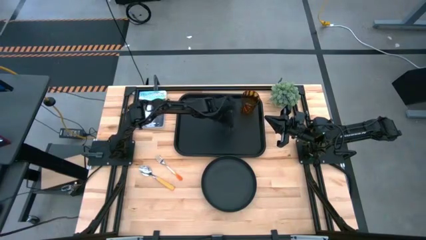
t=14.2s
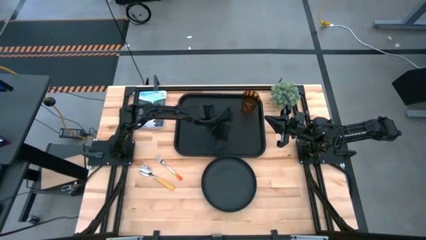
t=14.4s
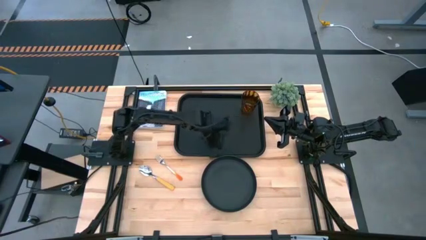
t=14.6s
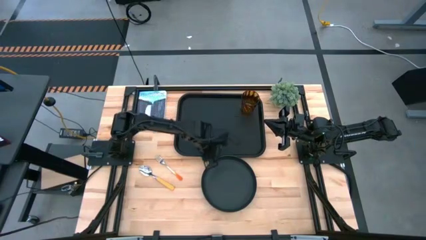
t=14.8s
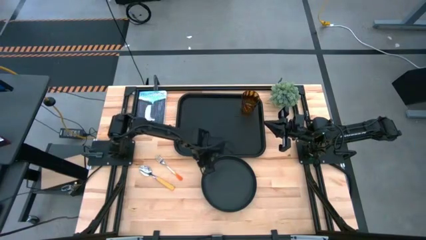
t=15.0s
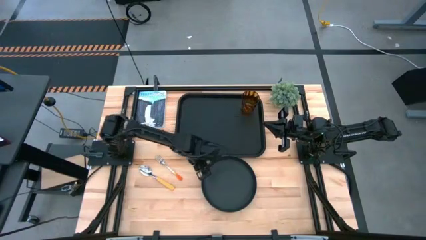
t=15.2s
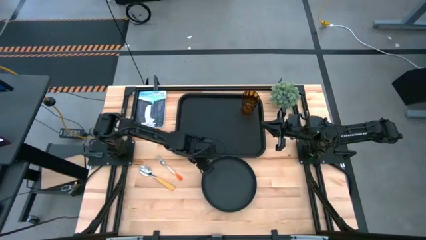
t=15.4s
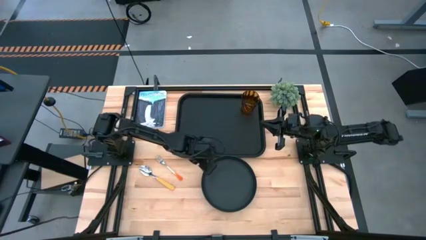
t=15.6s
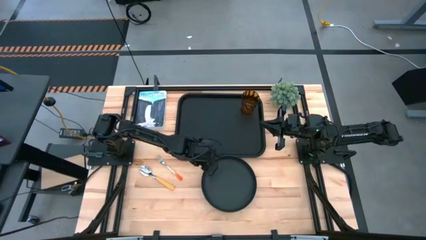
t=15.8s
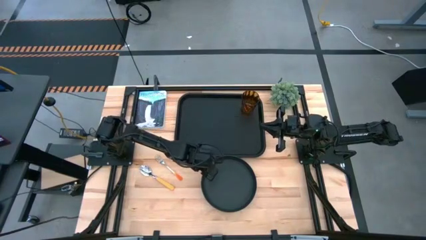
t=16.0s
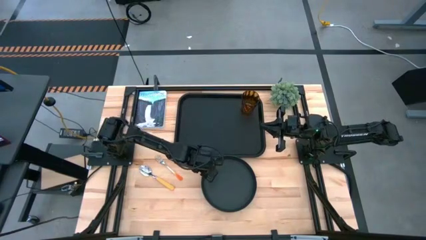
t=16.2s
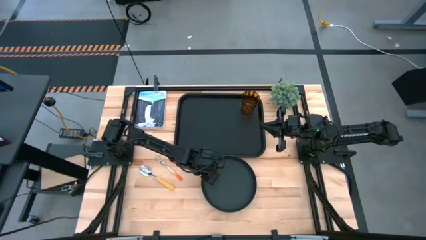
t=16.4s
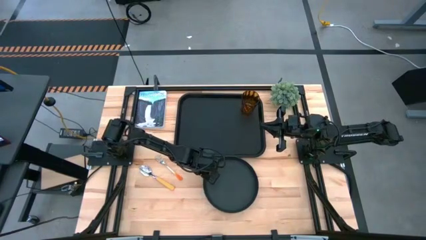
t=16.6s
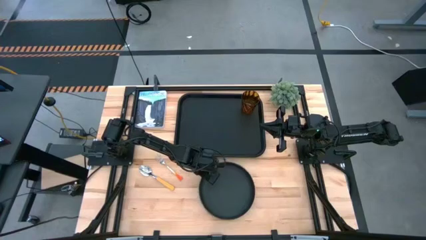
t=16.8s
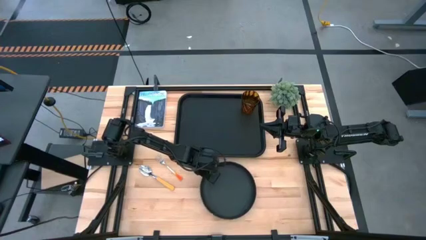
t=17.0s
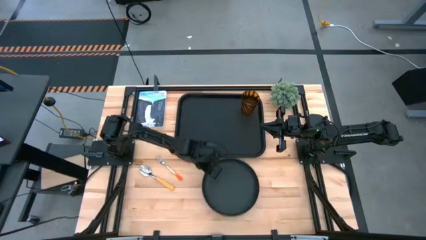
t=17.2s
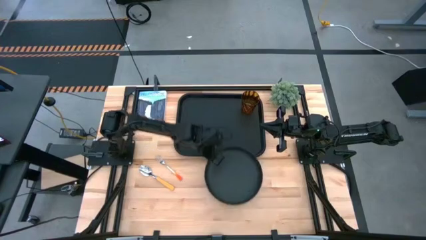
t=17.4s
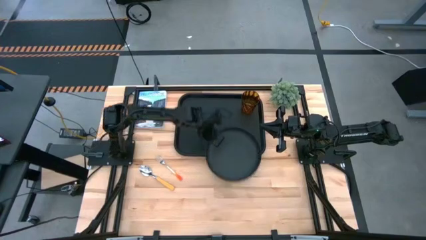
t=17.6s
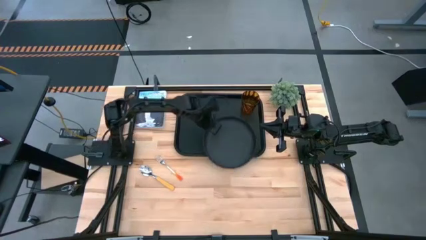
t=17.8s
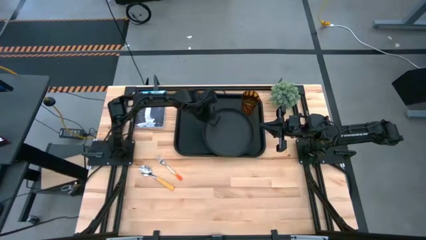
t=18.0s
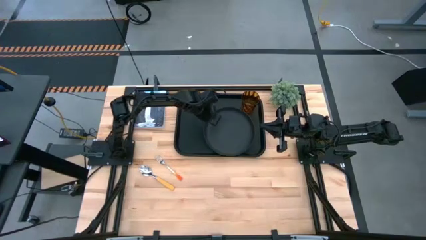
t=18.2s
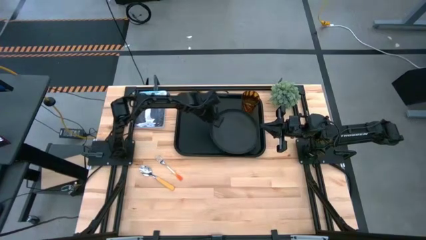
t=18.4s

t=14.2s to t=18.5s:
Task: Pick and place plate/cup/fork/spoon on tray
Put the black plate on the black tray to the bottom of the brown cup

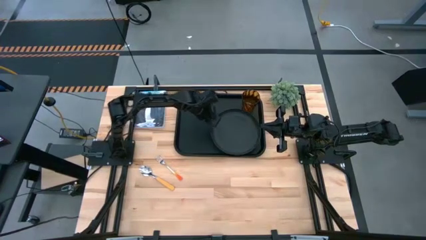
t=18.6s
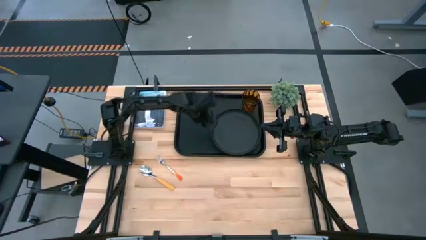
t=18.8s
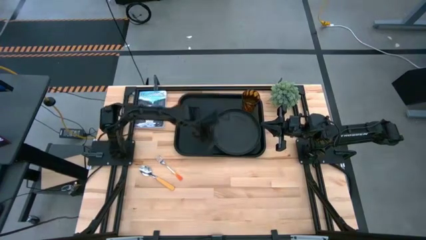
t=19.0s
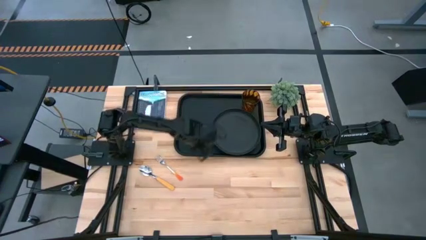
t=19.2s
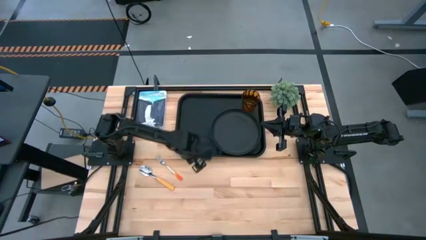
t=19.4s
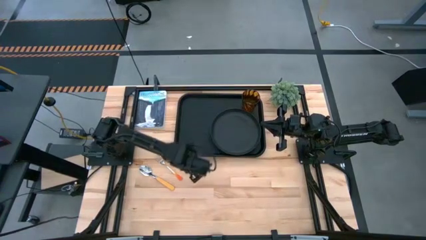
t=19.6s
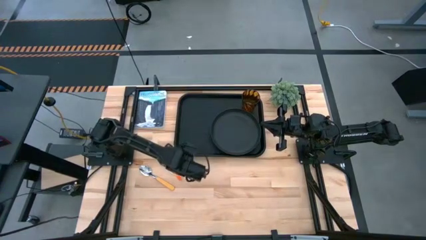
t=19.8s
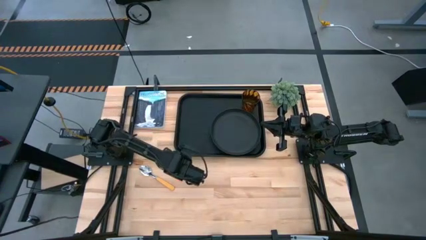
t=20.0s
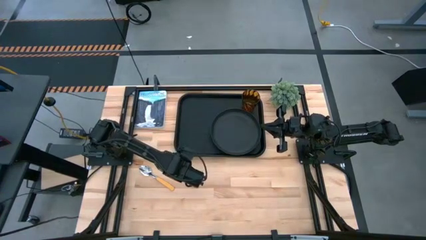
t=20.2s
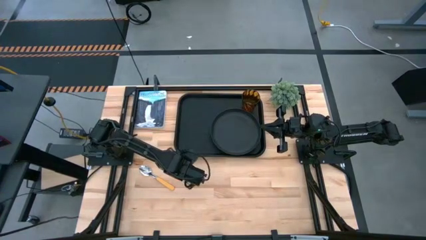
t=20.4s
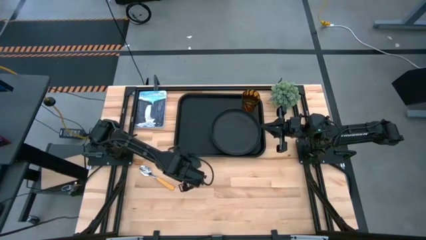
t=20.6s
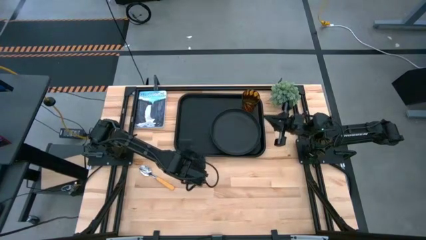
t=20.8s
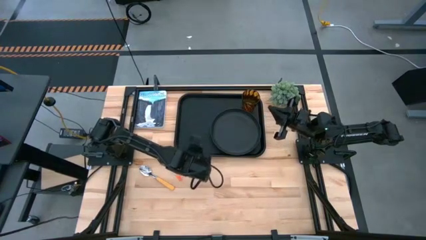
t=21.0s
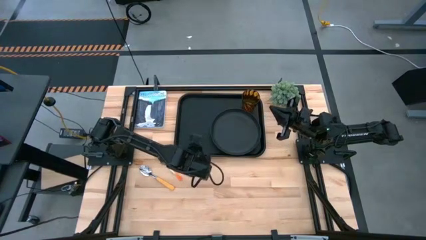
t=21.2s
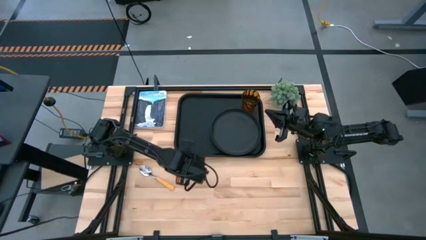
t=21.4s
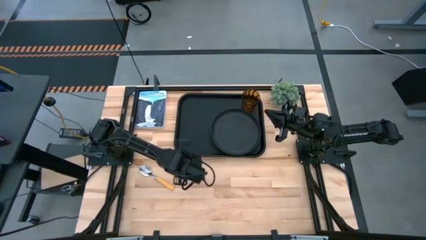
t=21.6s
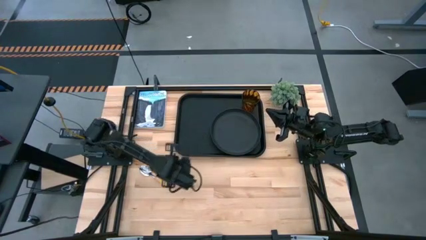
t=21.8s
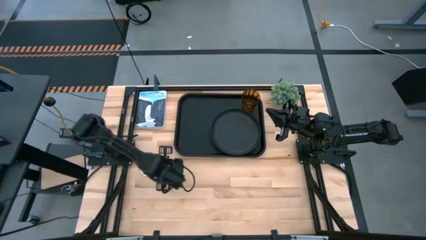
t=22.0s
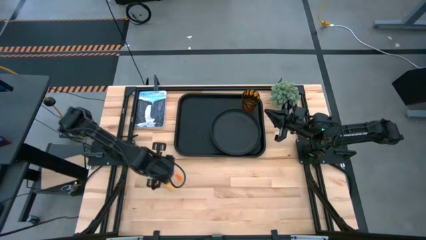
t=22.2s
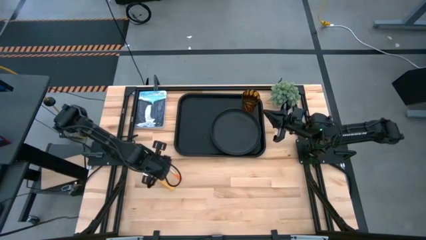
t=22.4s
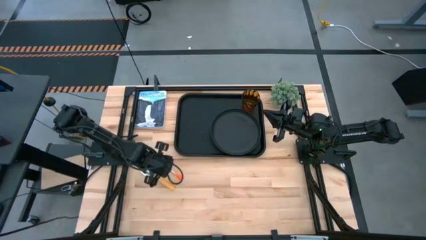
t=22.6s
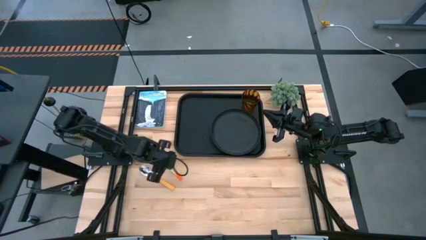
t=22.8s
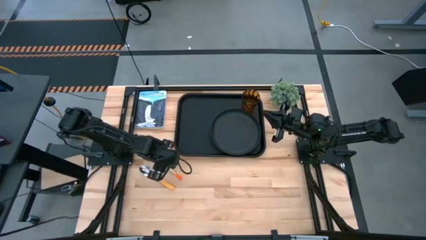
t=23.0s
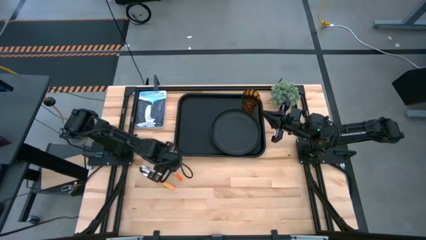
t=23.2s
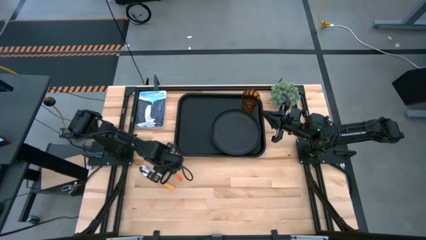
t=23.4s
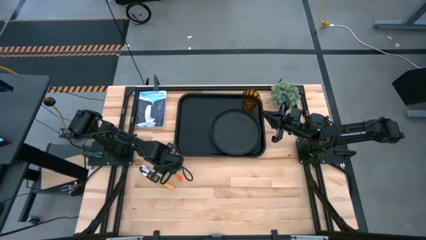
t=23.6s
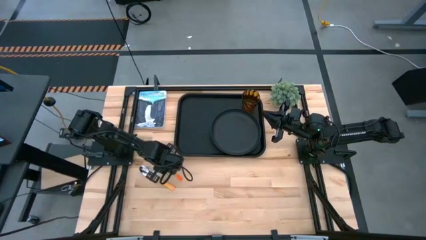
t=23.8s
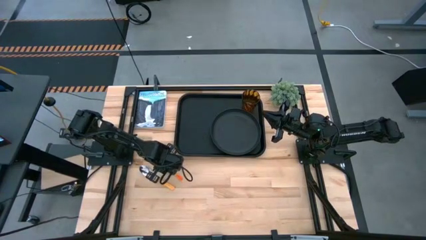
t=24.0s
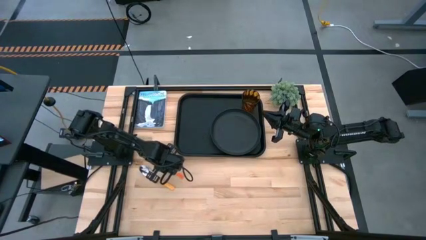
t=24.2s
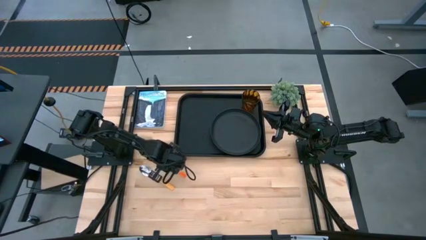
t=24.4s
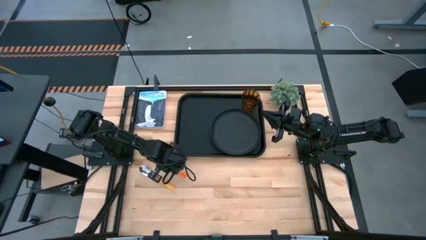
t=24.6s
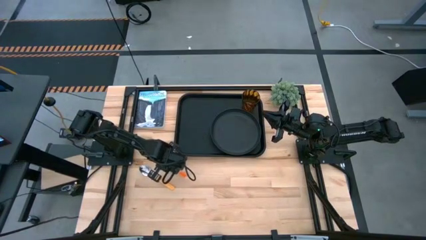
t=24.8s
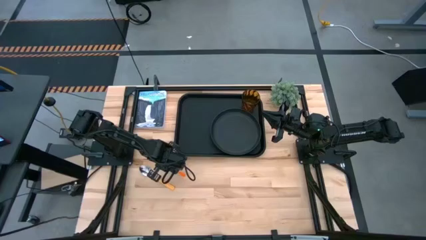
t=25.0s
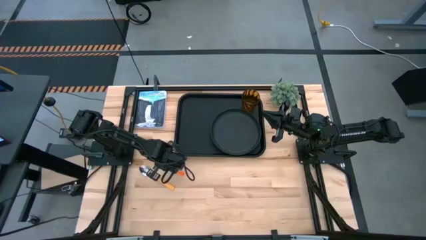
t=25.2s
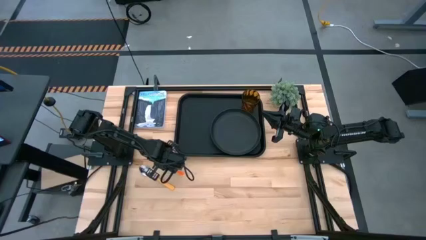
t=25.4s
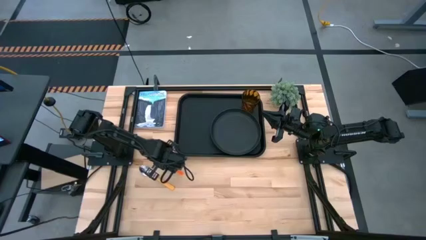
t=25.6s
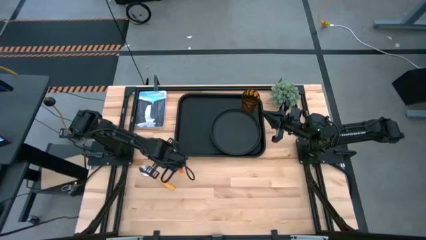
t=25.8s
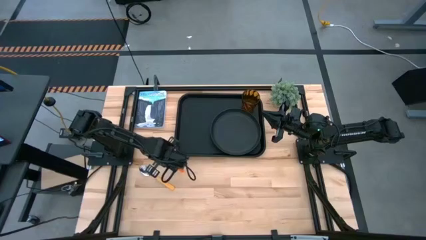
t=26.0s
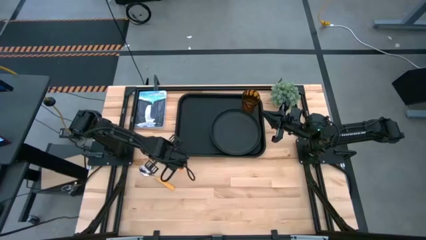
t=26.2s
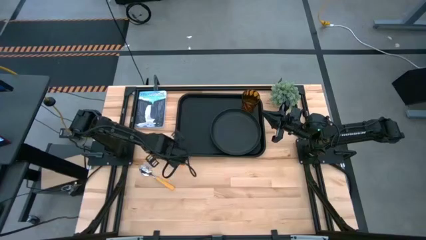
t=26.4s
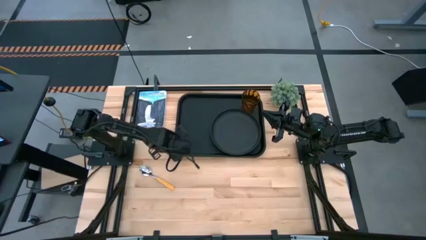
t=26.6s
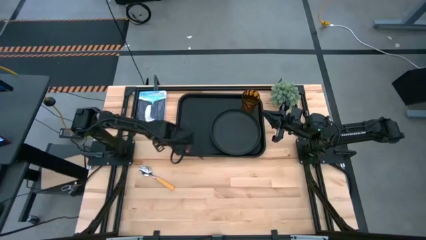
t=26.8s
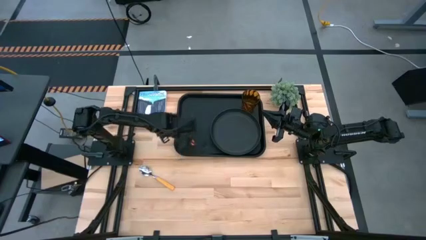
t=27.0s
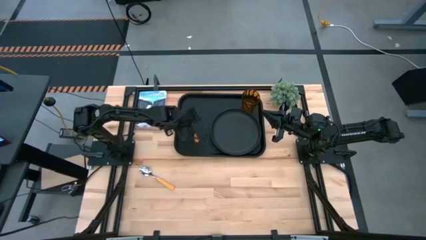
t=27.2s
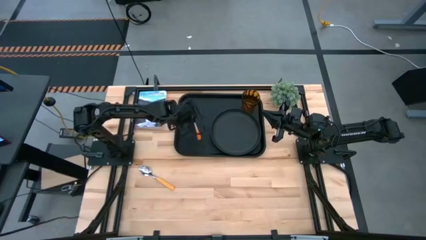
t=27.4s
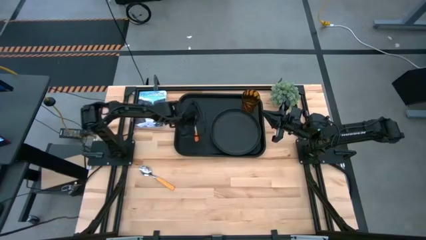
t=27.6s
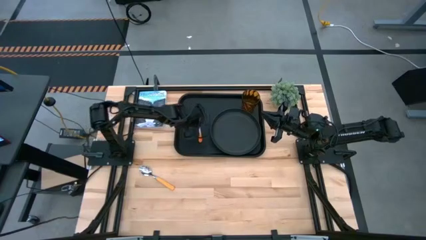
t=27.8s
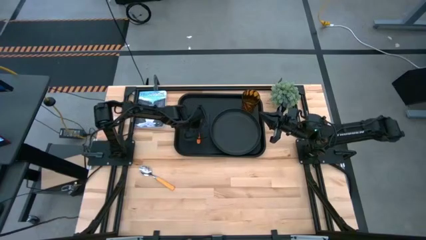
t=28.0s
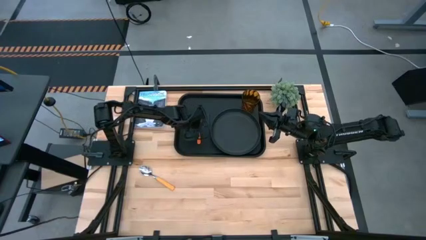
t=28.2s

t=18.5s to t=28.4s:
Put the orange fork on the black tray to the left of the black plate

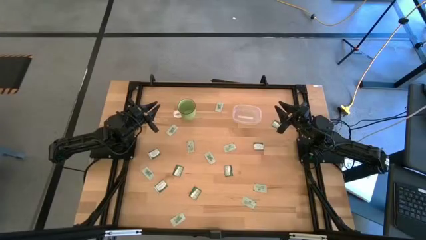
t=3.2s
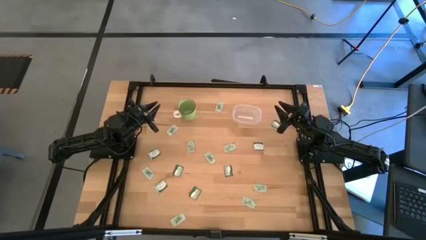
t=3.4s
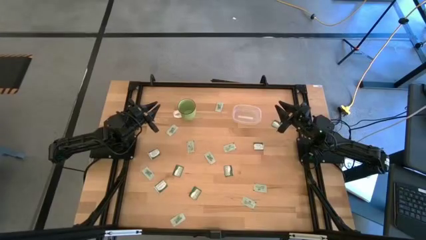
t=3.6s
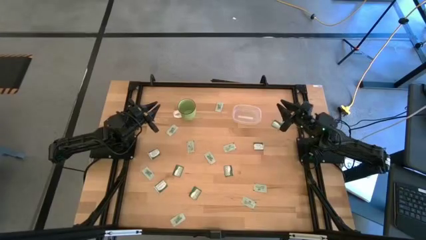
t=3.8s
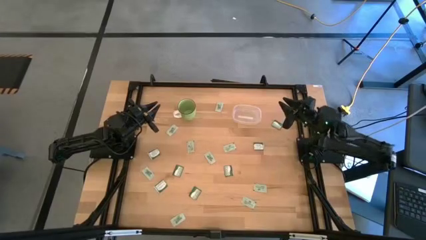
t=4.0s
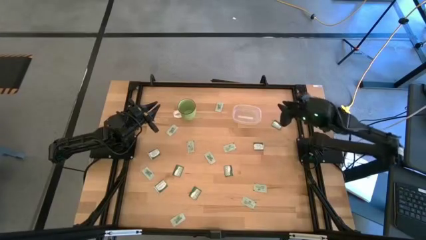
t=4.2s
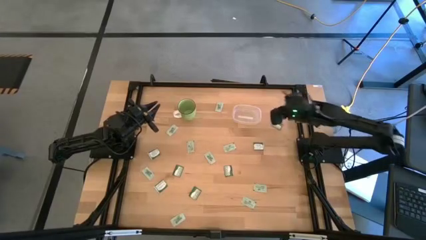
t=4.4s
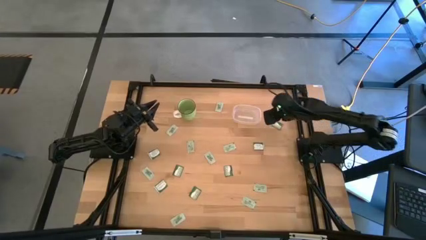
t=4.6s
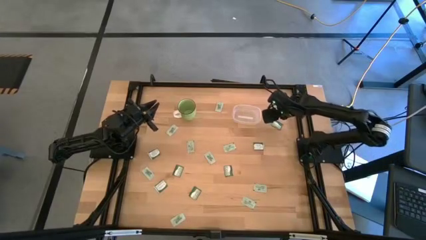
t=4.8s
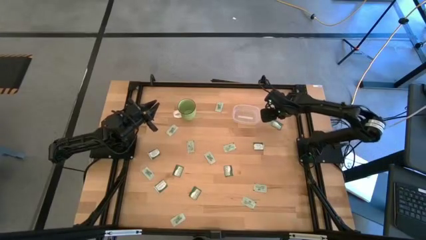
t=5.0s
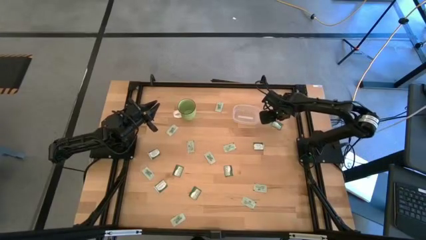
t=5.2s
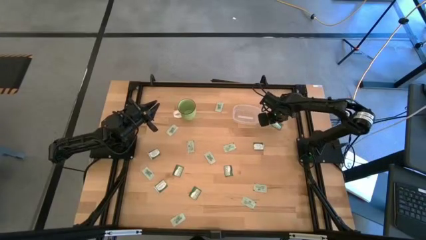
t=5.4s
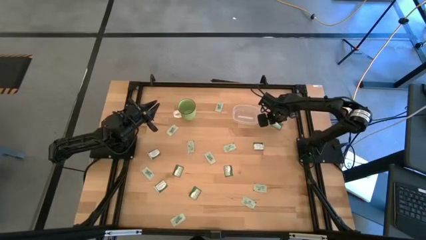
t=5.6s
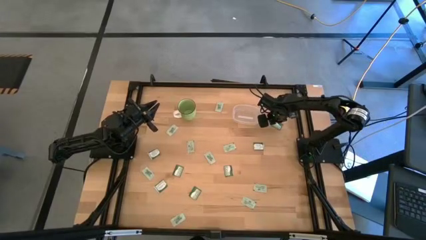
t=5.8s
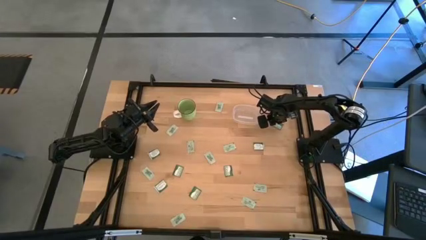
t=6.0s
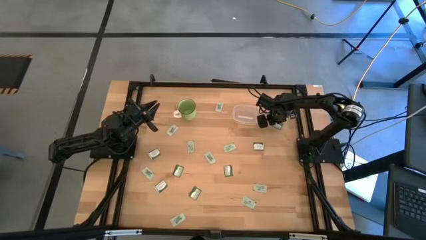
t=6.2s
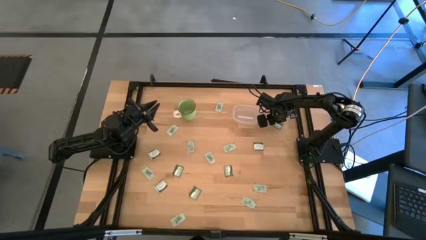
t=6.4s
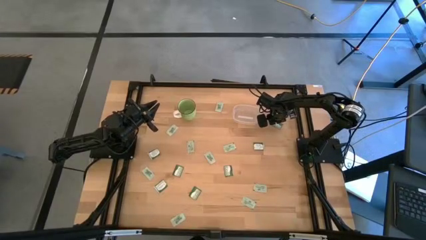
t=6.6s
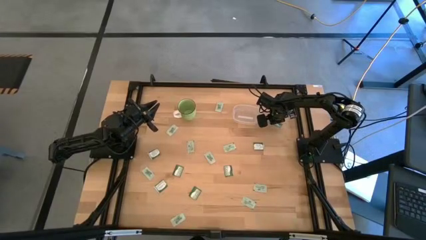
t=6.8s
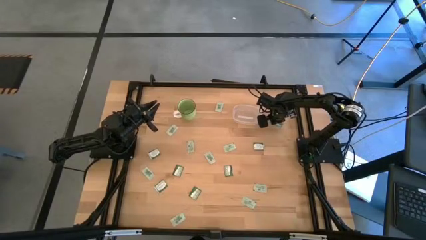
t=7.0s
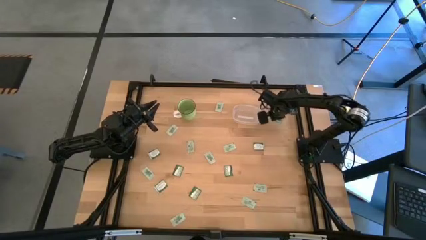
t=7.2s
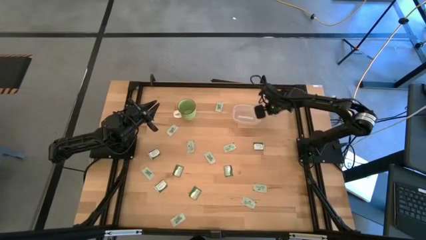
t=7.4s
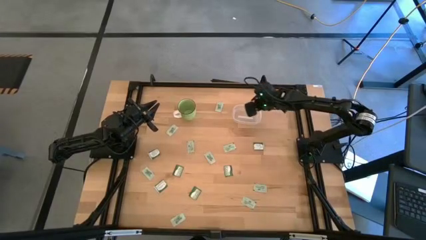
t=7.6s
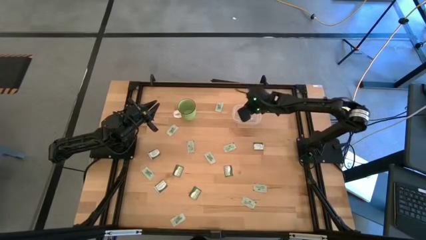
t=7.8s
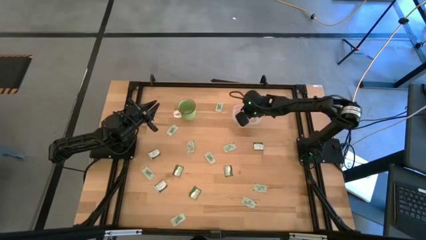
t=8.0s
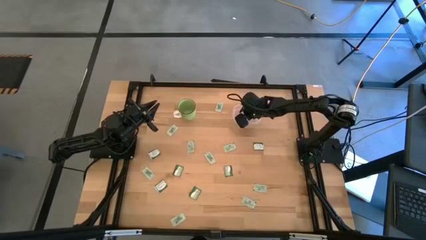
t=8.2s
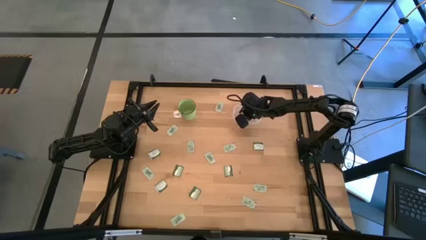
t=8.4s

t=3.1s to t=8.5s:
Task: Pick and place items into bin
Put the green truvia packet into the transparent bin
